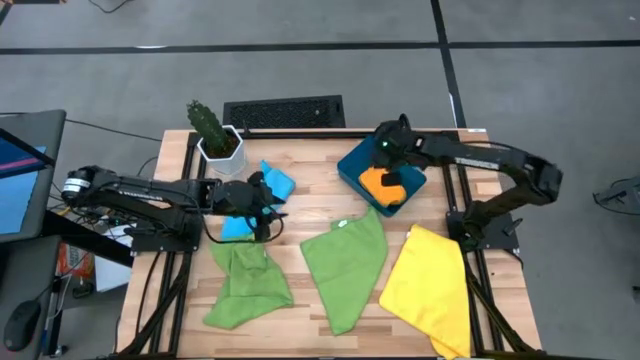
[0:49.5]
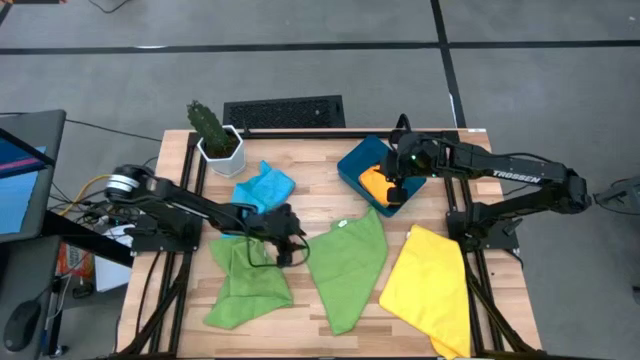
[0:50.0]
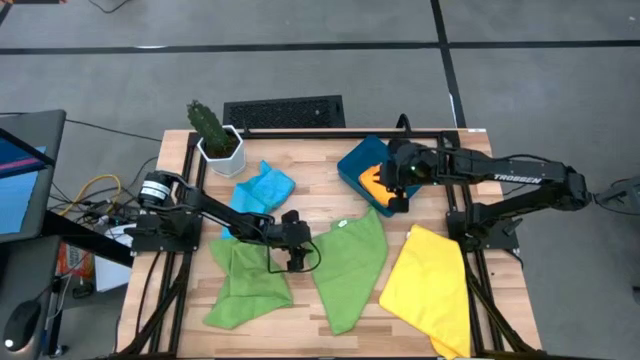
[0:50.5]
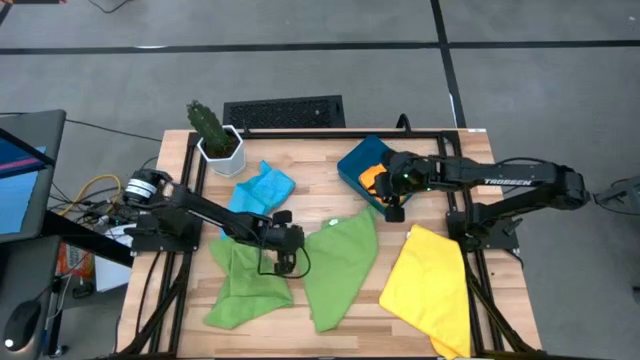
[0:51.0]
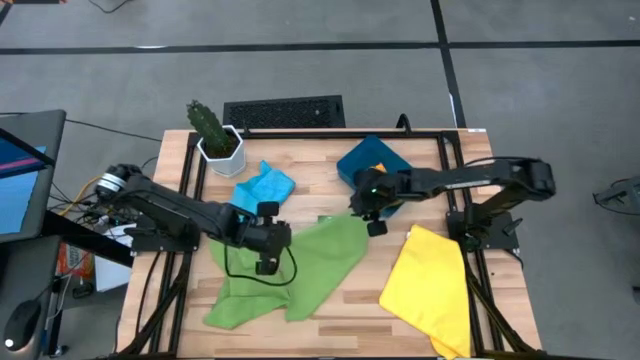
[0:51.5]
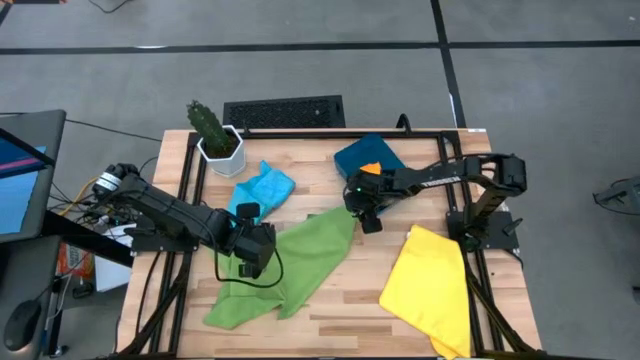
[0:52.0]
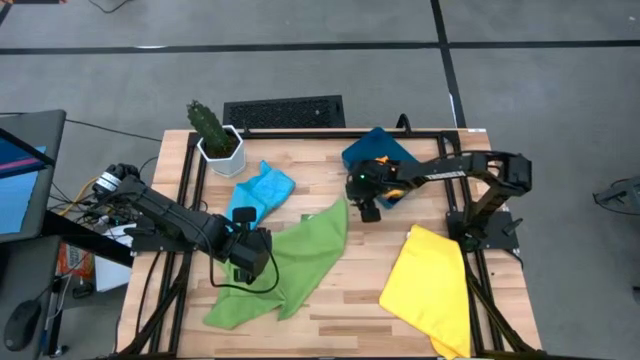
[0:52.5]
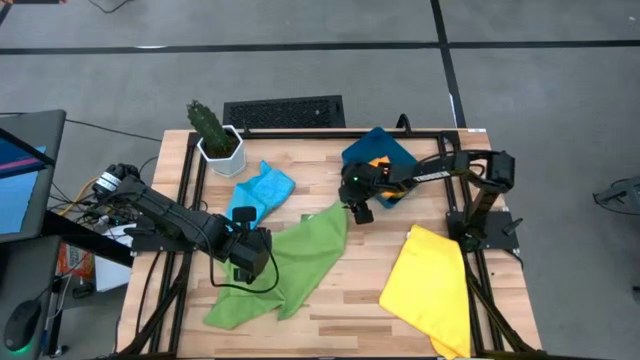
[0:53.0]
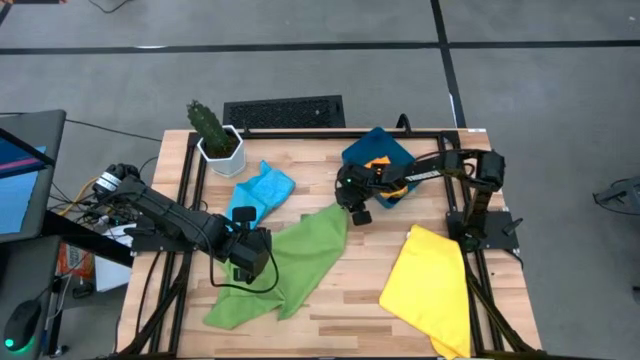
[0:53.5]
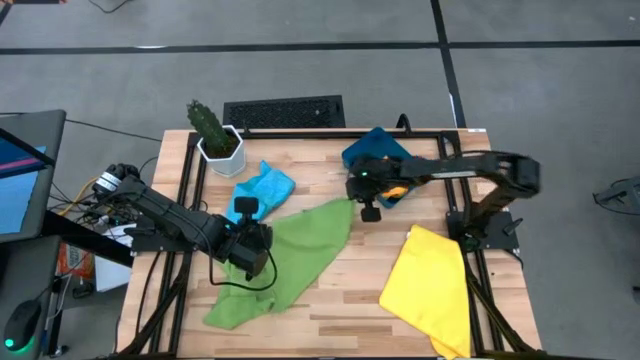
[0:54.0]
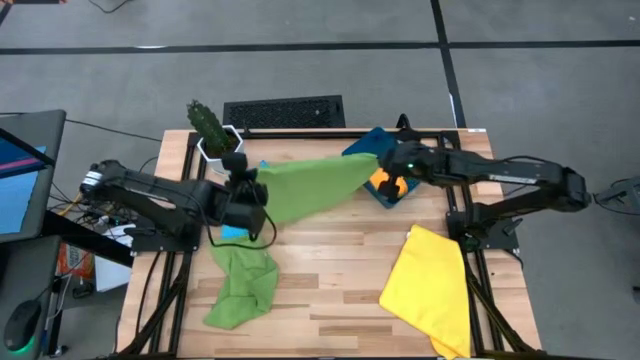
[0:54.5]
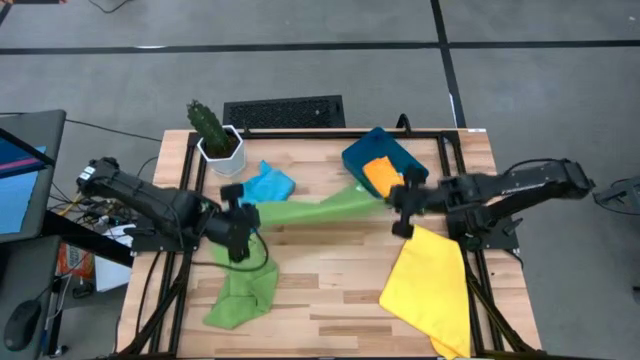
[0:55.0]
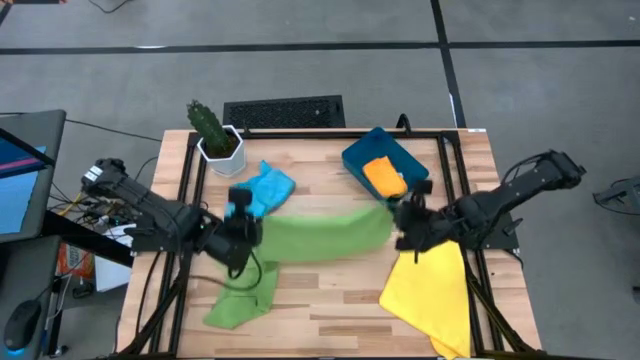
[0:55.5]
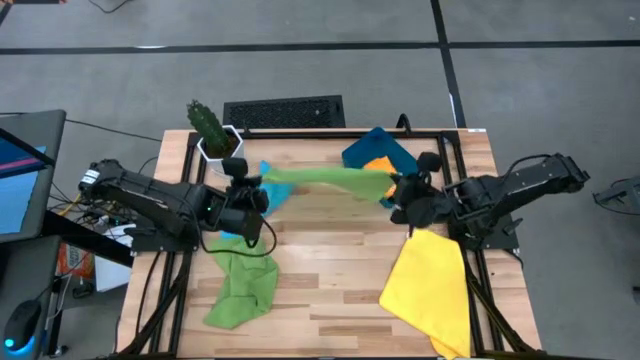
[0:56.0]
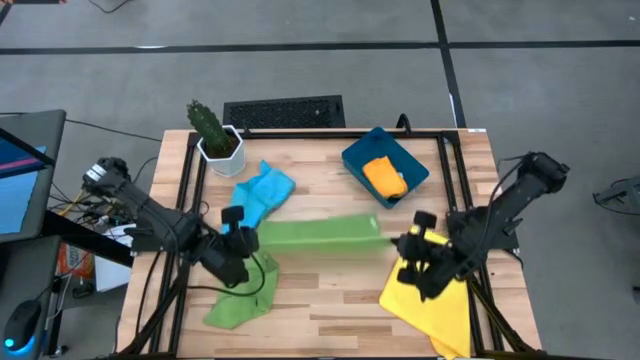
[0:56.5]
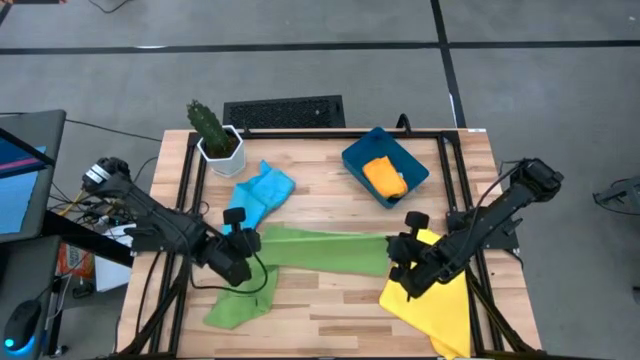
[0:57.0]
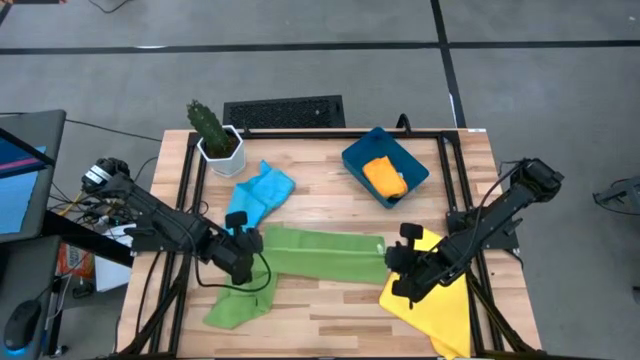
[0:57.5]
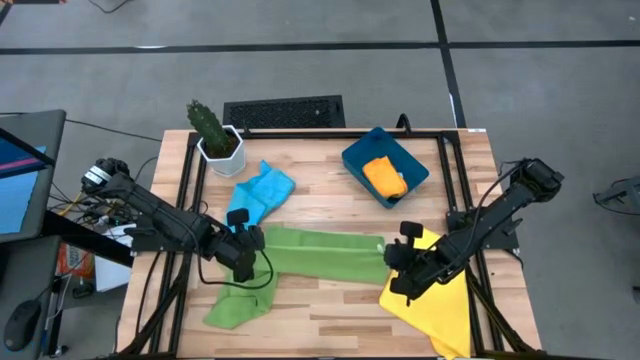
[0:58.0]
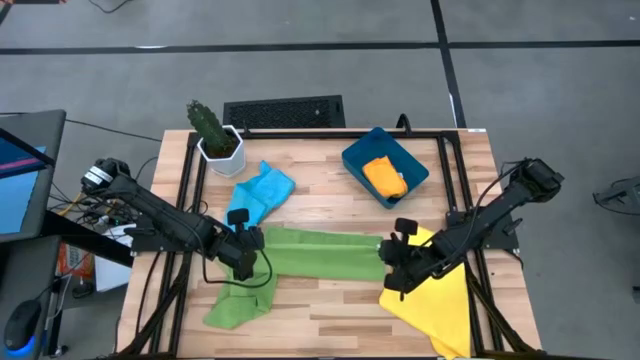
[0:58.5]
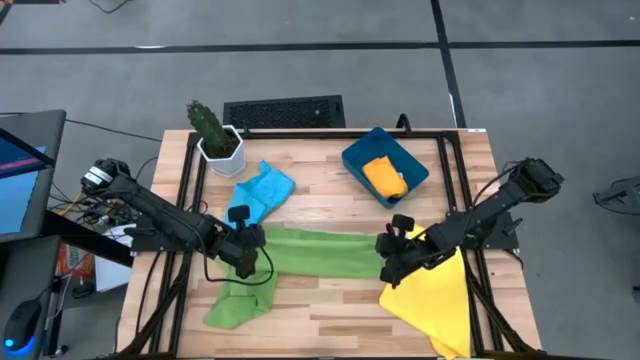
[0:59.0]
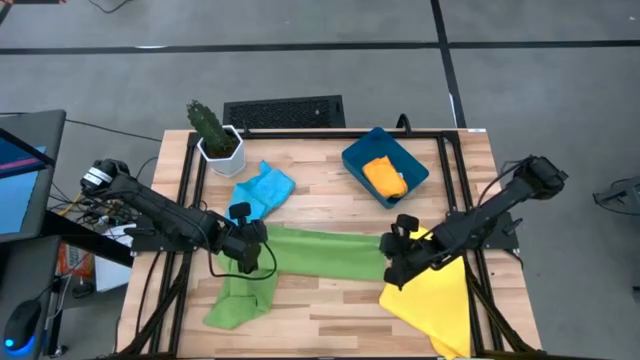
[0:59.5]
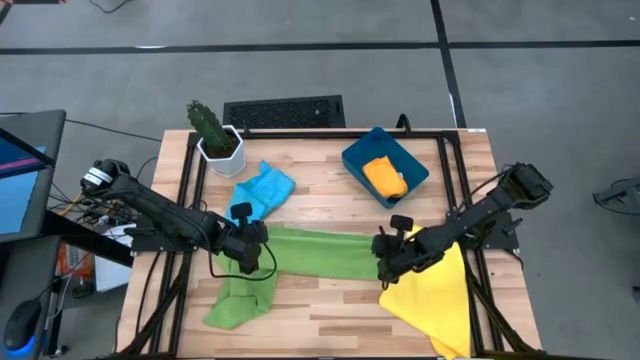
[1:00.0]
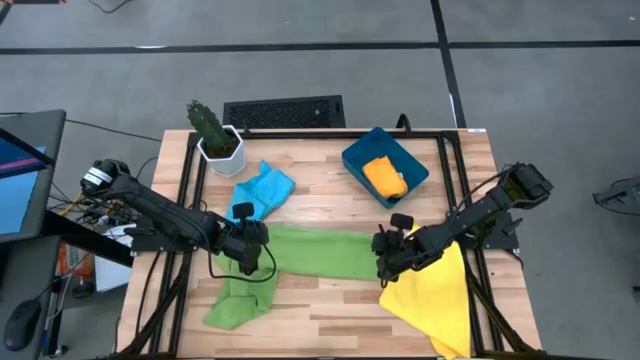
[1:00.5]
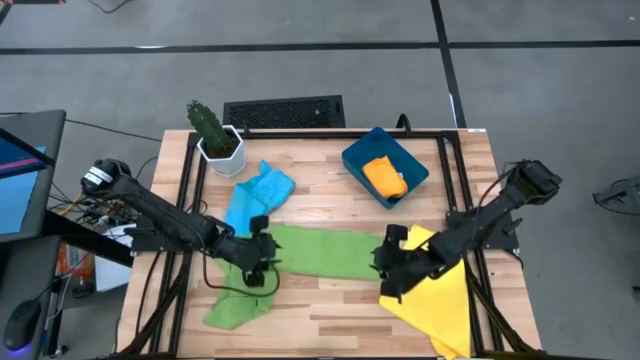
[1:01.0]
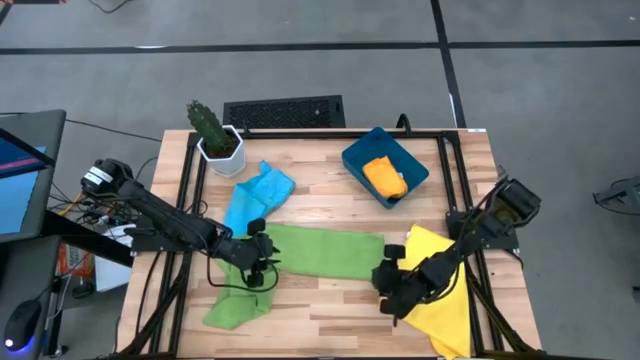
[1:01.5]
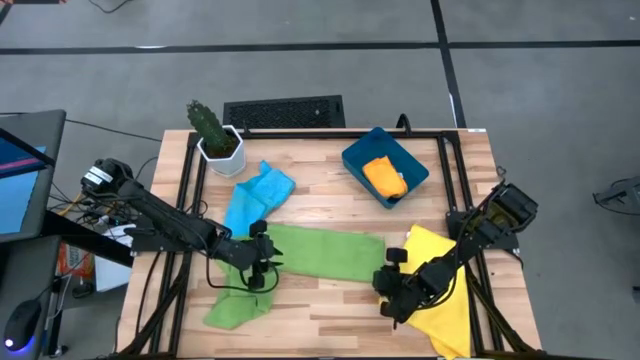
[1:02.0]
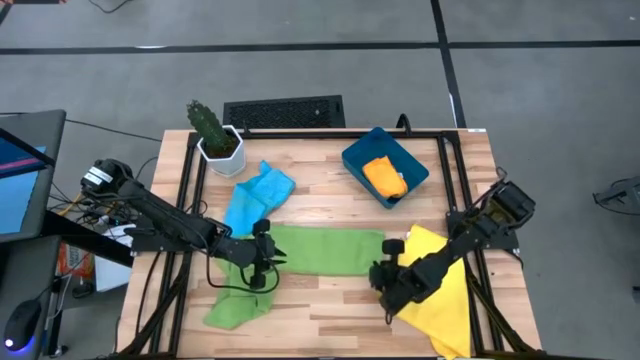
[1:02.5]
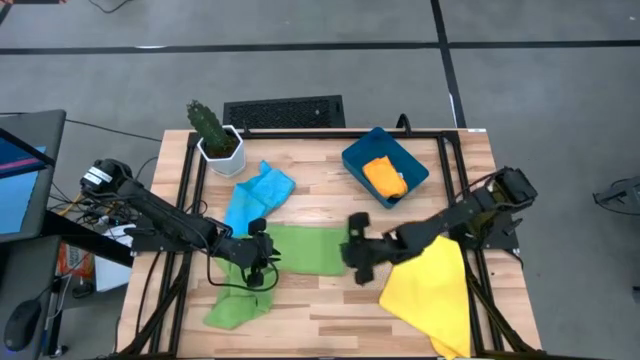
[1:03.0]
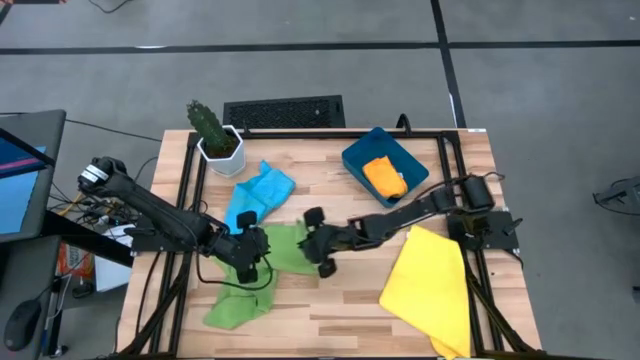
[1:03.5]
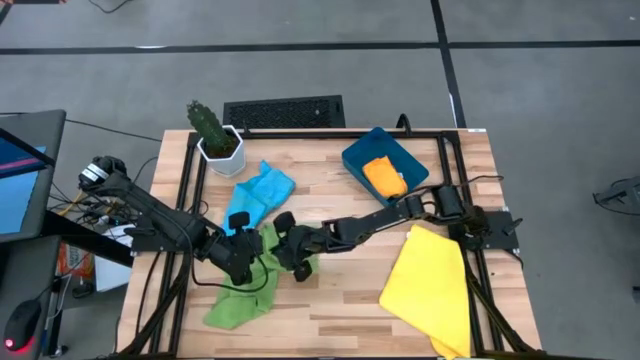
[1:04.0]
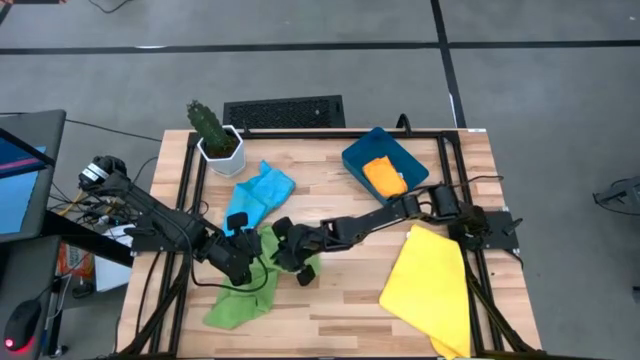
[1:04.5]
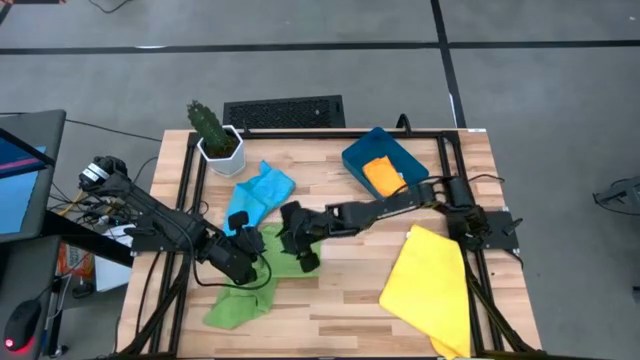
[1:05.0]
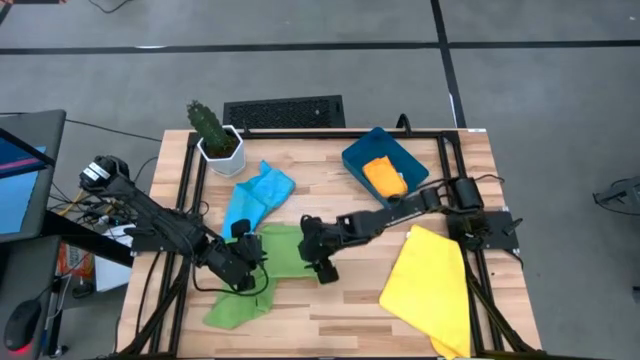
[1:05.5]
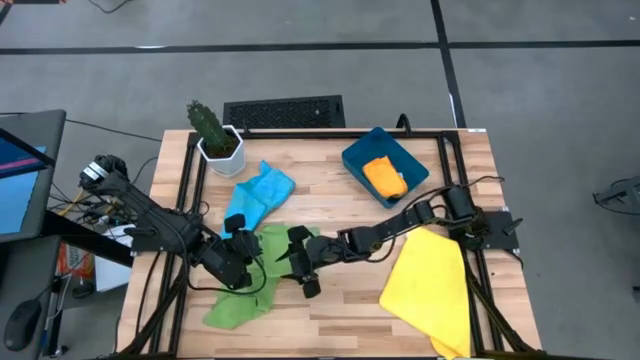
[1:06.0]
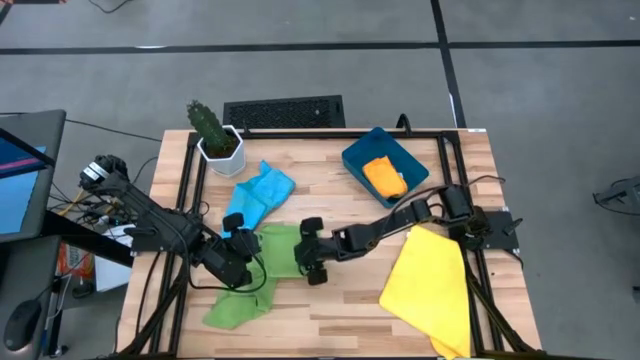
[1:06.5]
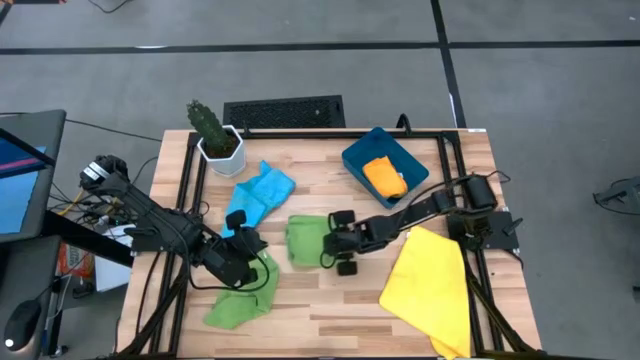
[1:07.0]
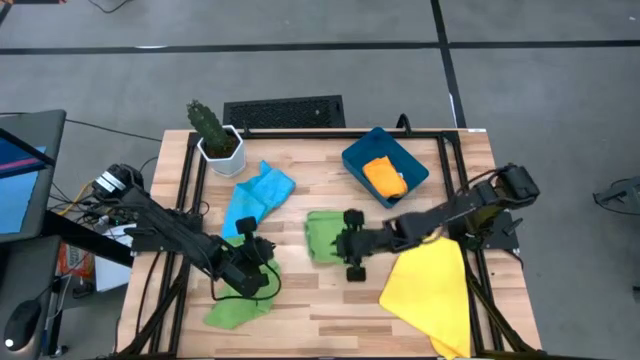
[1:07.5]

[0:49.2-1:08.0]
Task: Fold microfiber towels
Fold the right green microfiber towel
